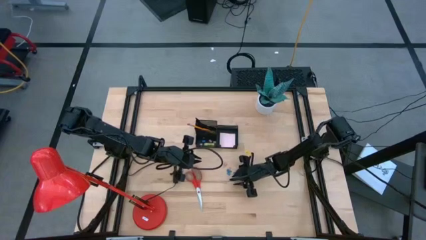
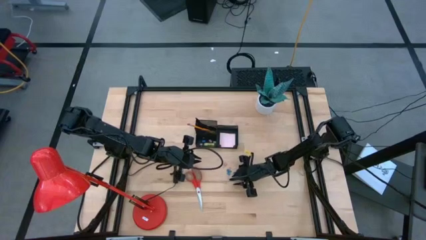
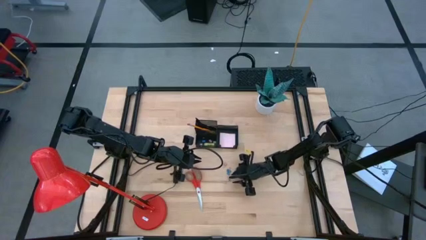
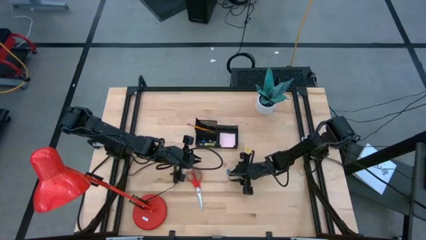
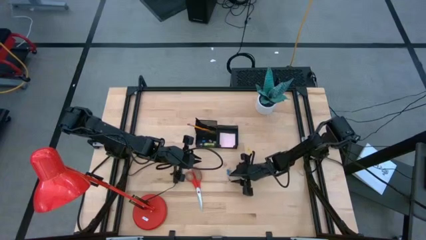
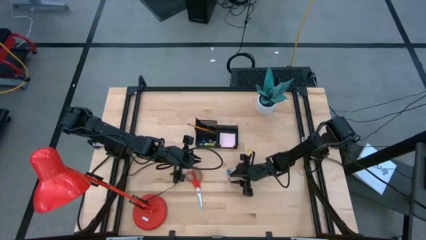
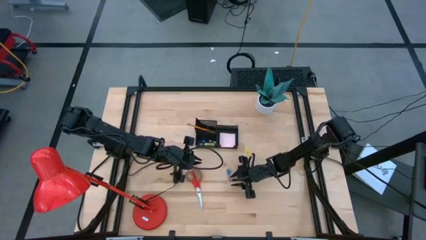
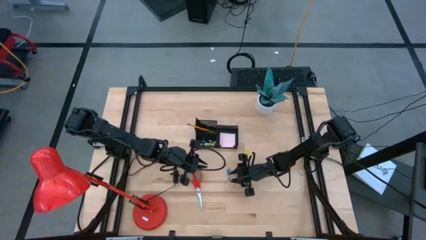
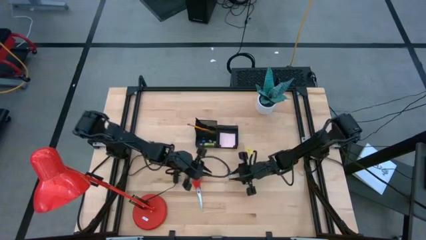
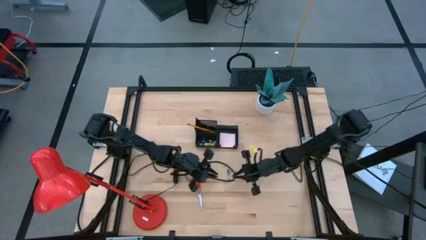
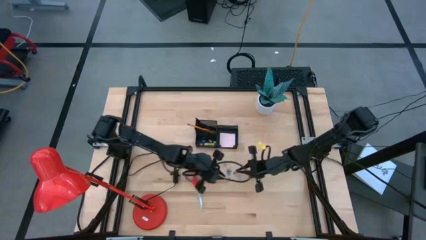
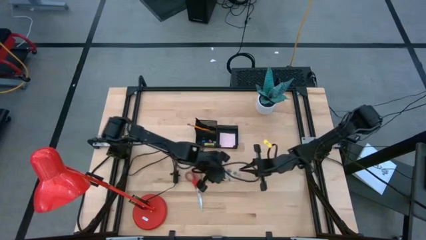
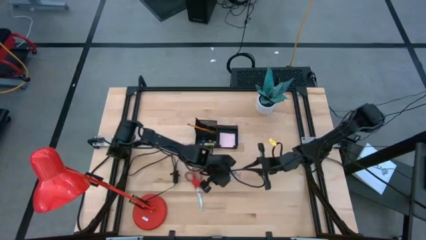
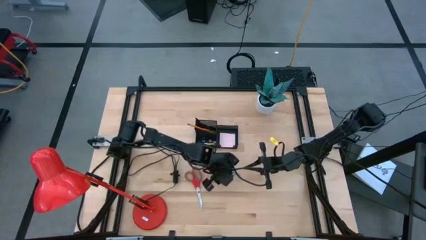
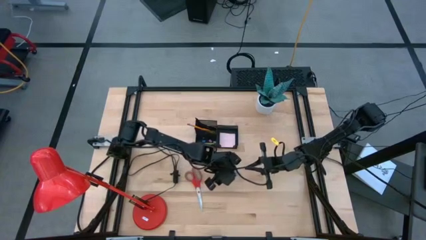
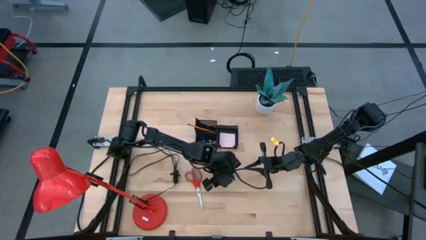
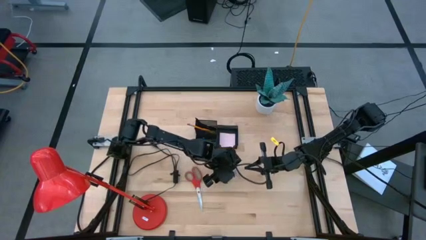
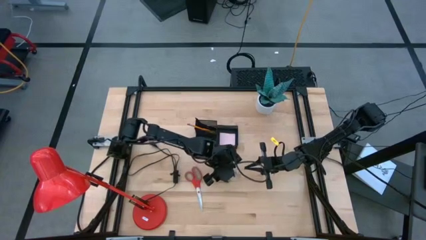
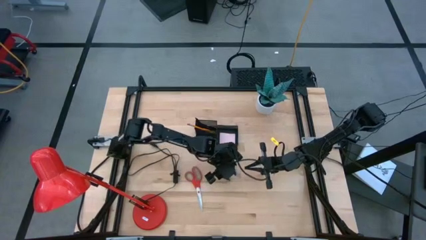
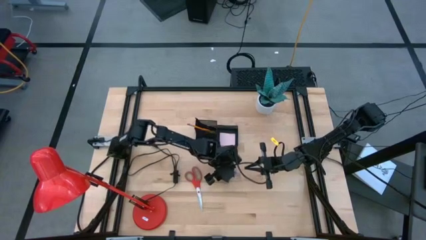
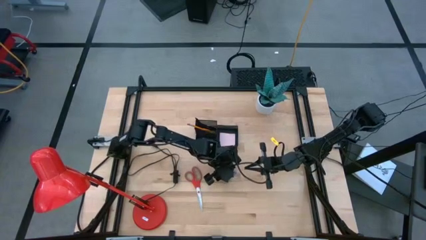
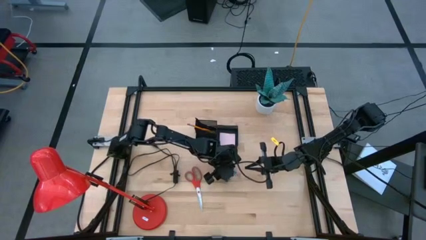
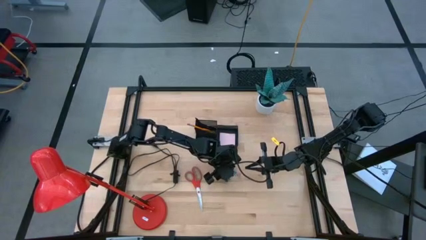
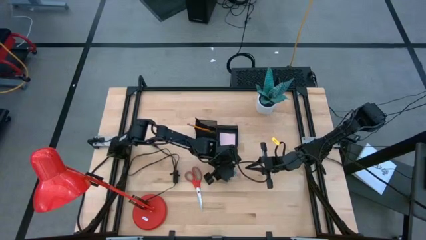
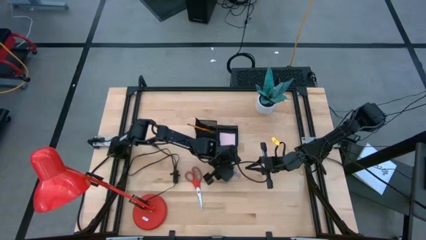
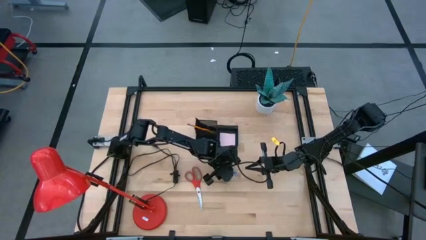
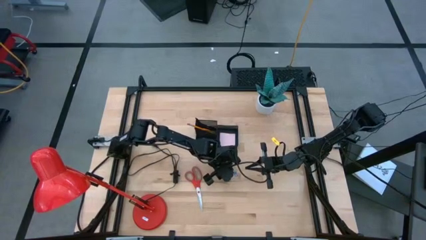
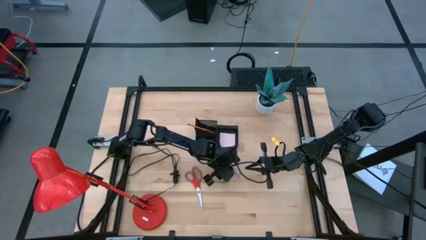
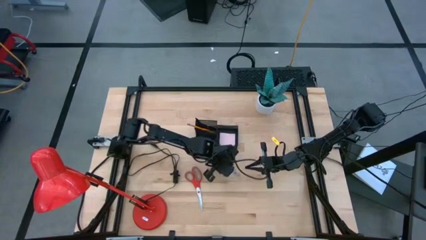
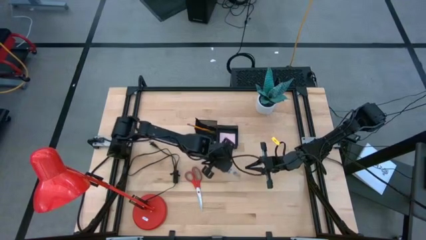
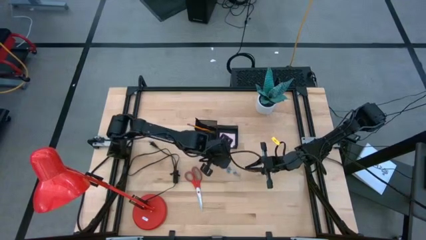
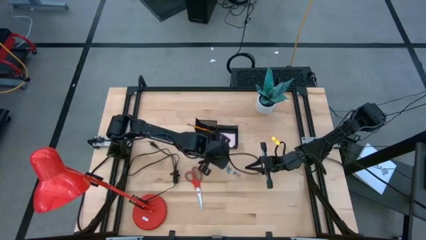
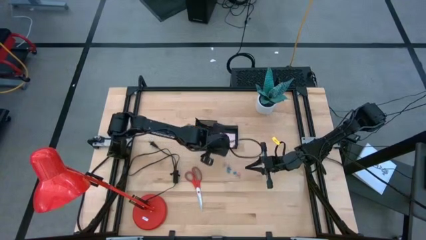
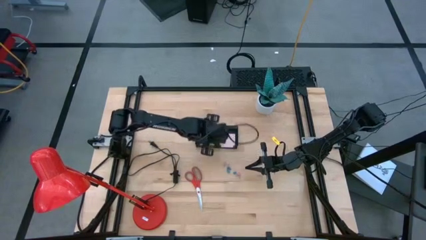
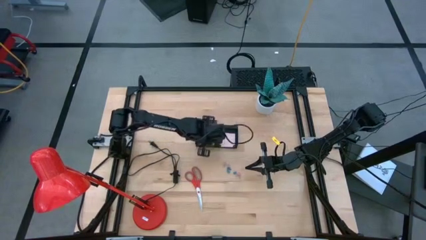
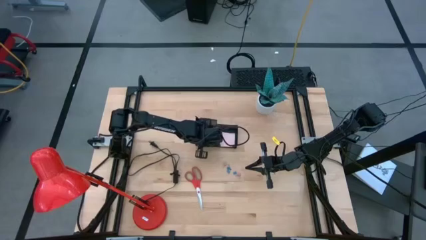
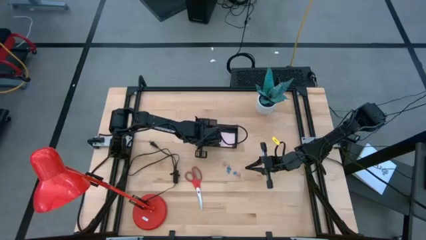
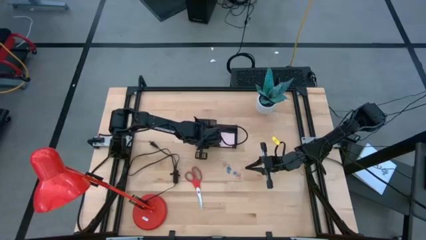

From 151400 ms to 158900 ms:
Task: Pick and place office supplies into organizer
Put the blue binder clip into black desk organizer

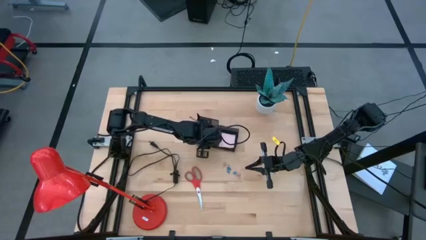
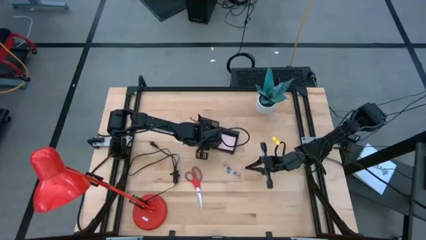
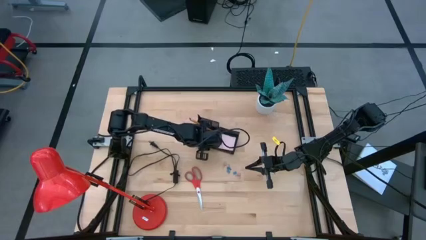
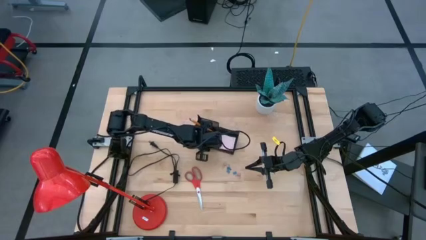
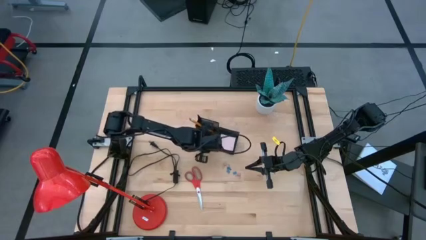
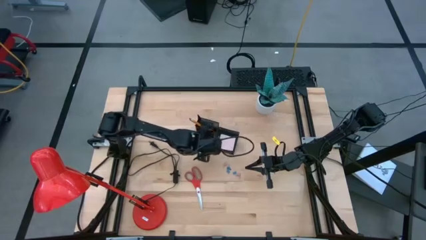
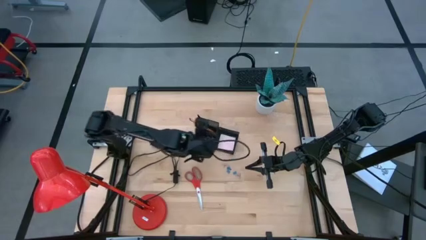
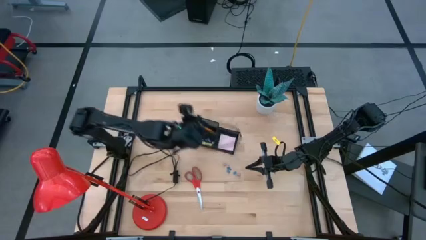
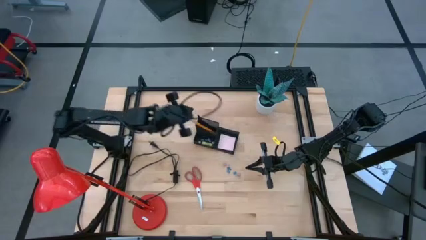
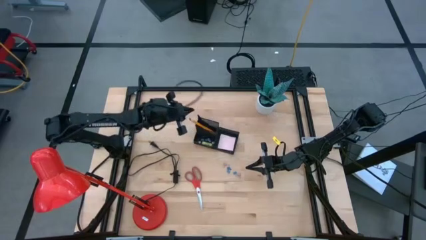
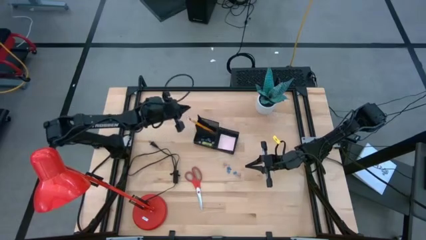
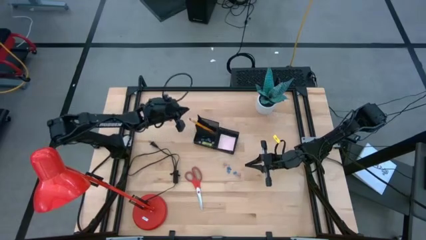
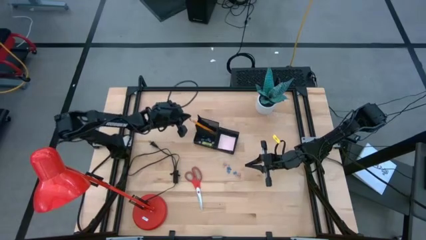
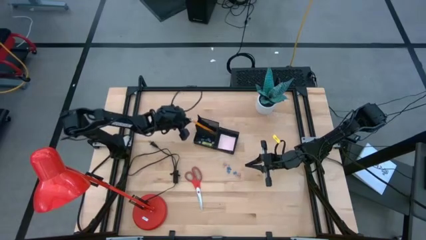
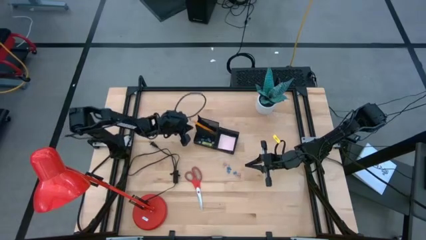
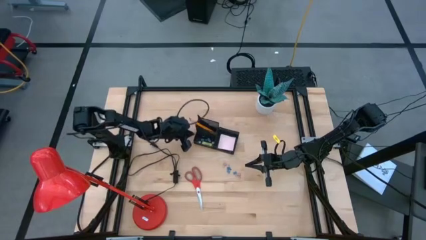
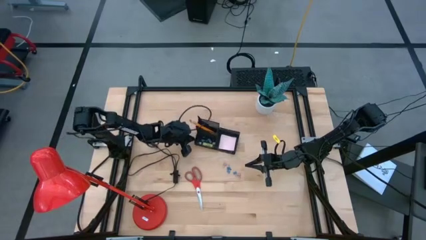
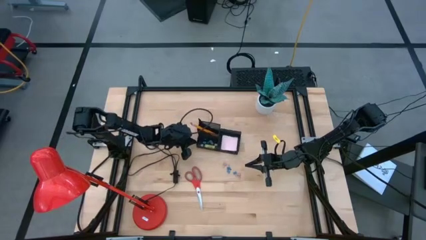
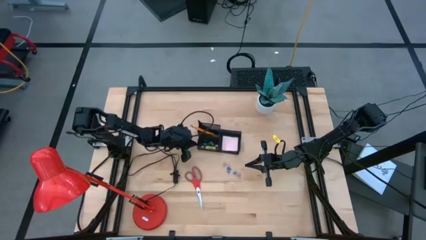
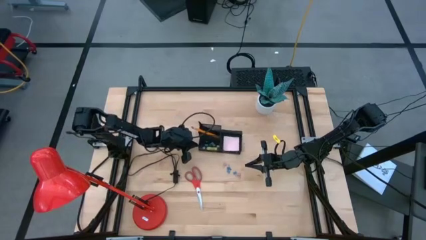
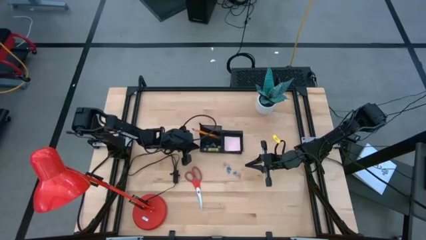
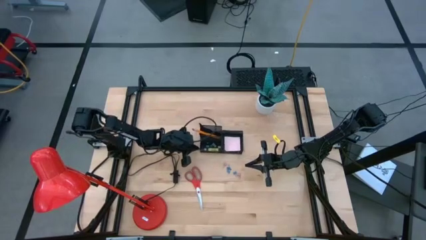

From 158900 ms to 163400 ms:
Adjust the black desk organizer

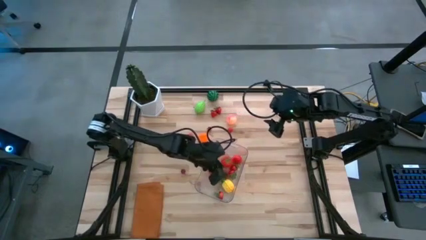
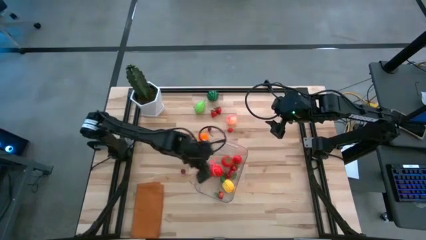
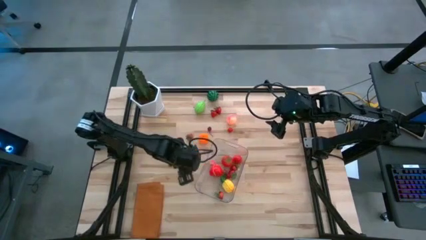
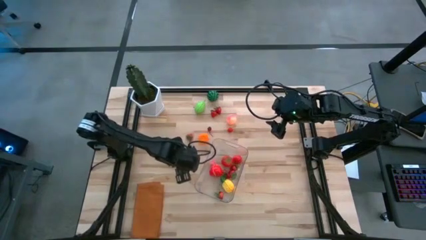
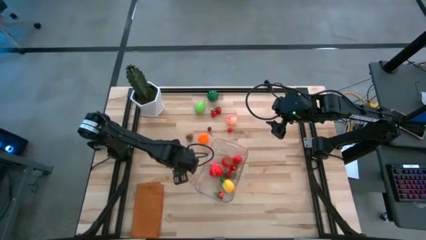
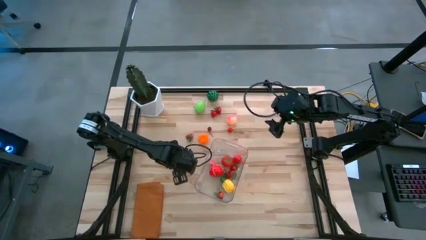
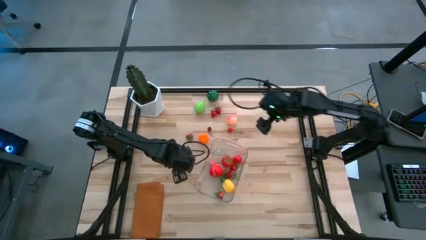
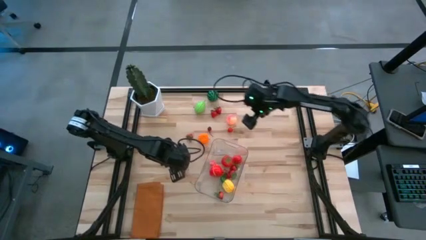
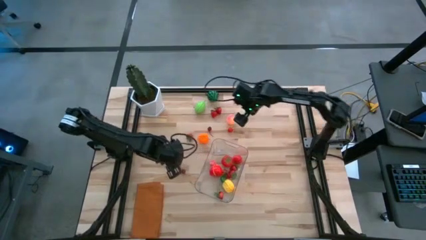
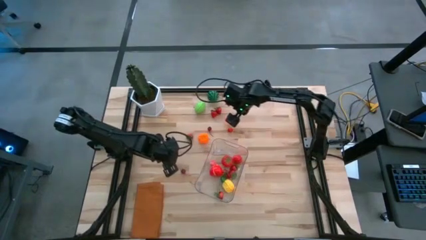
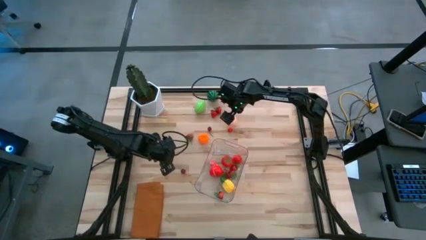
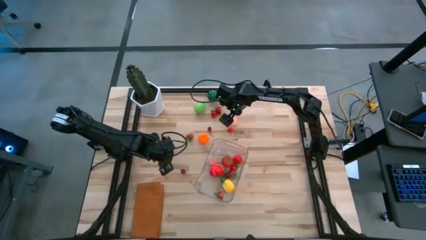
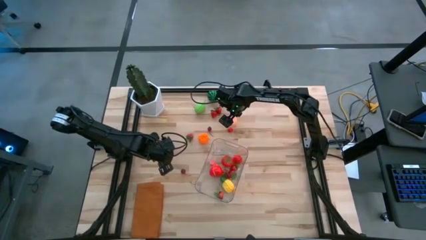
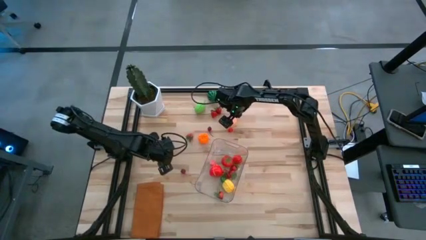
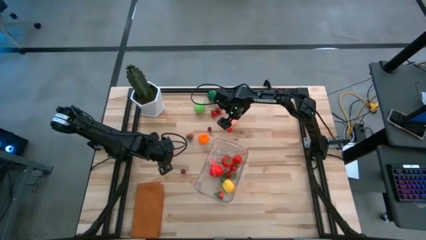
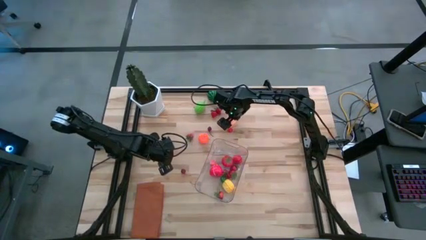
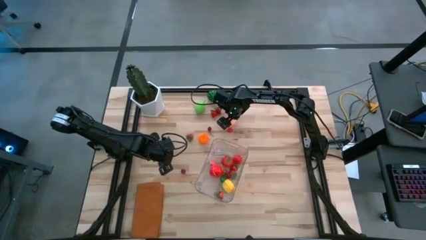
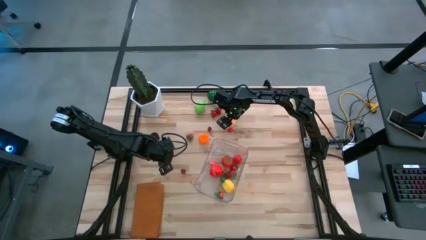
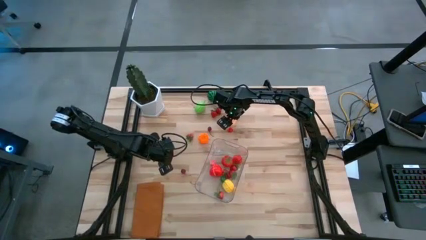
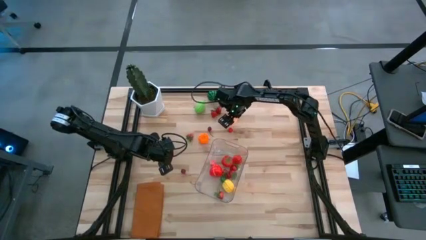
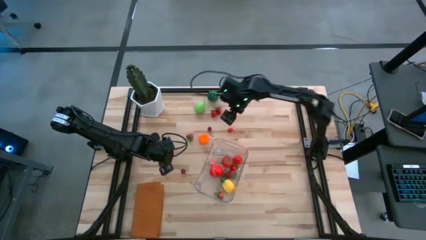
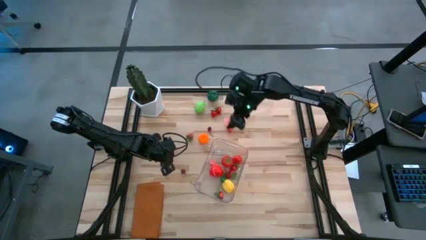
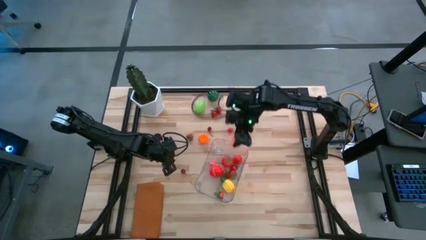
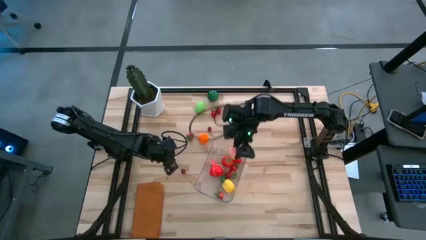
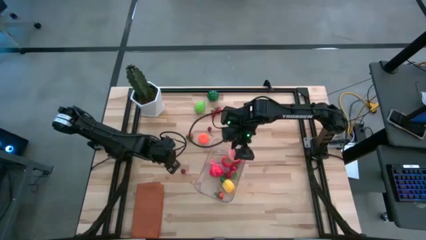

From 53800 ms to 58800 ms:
Task: Pick and placing Produce into tupperware
Put the light orange peach into the transparent bin
